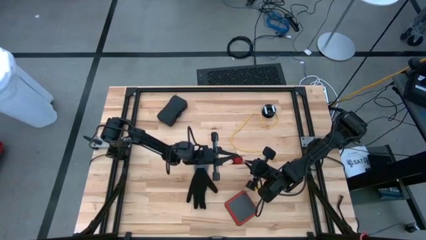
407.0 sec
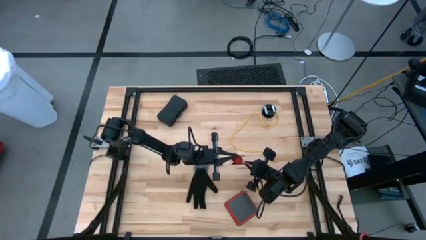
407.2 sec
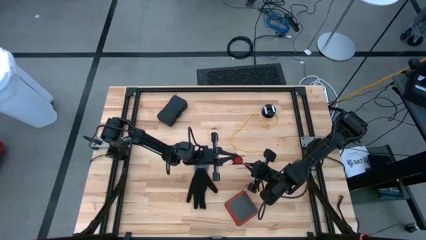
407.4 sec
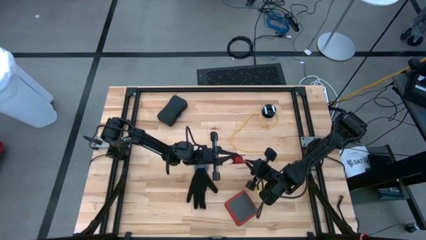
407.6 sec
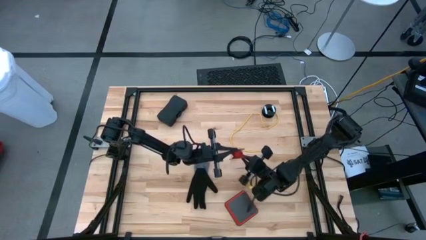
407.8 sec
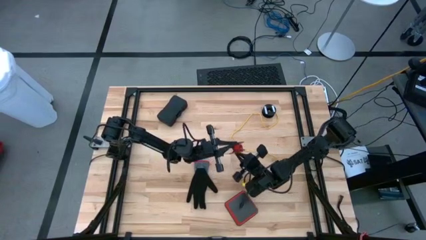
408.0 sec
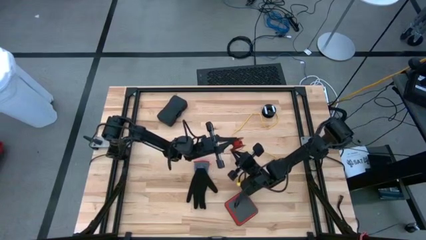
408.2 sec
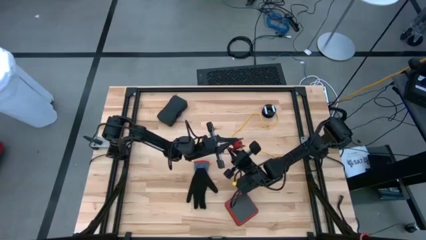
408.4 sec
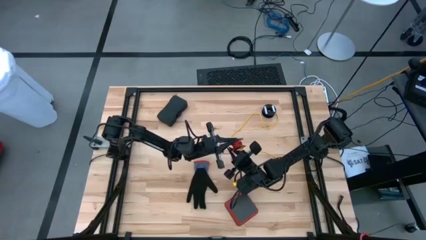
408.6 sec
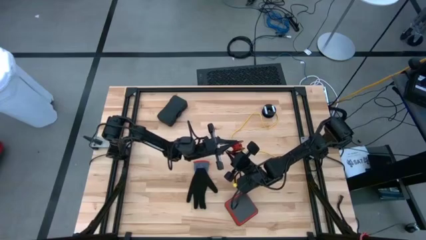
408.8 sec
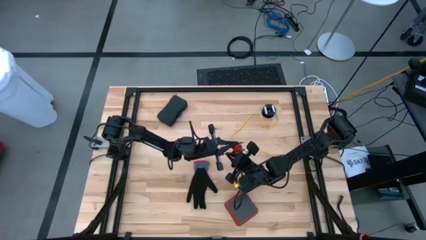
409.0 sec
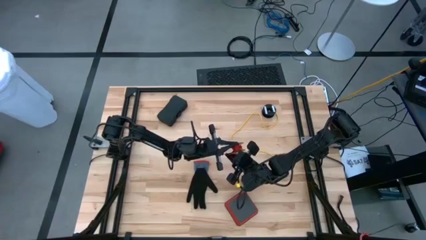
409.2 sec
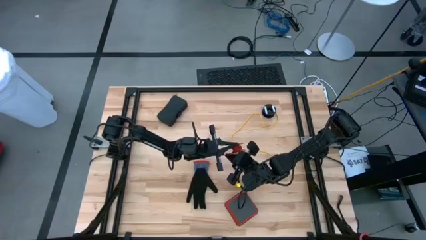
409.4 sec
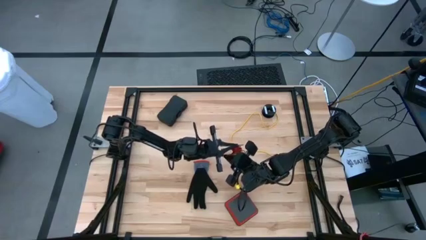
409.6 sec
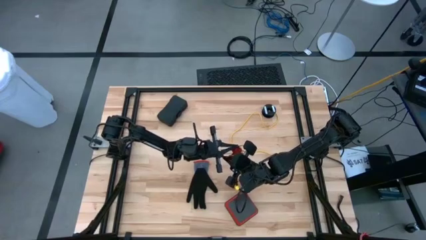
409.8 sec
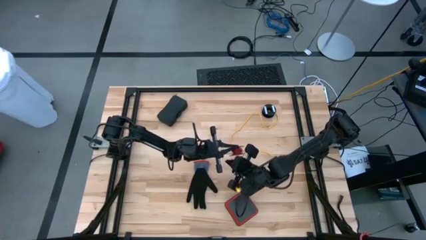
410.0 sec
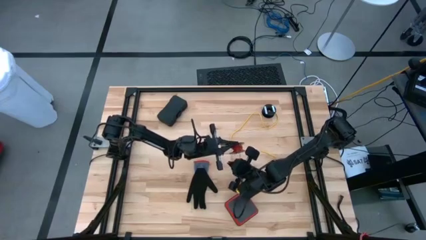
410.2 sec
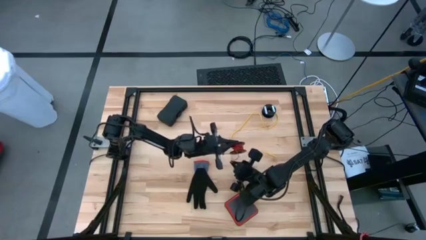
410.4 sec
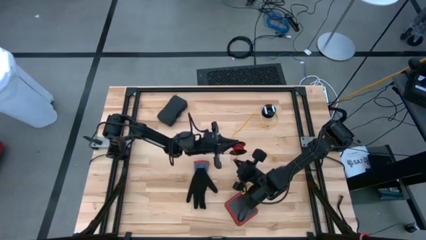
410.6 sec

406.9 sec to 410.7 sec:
Task: Coil cords
Coil the red wire onto the black spool

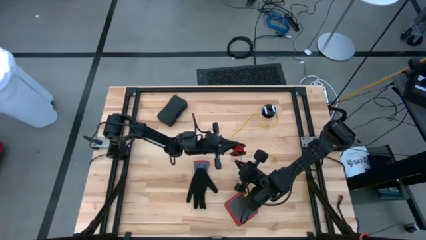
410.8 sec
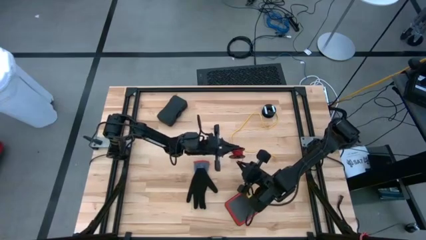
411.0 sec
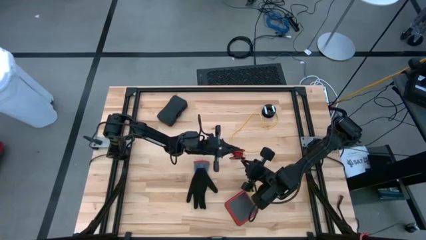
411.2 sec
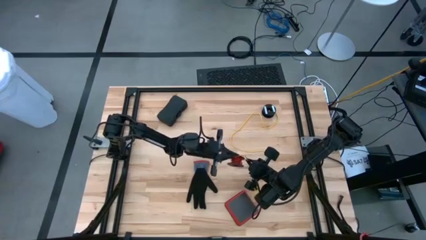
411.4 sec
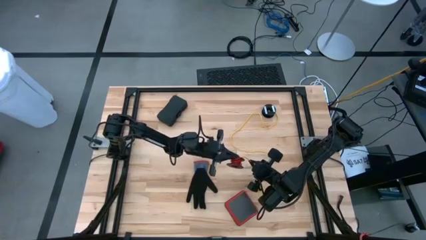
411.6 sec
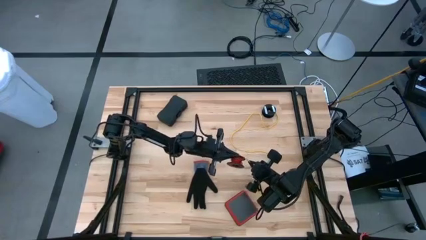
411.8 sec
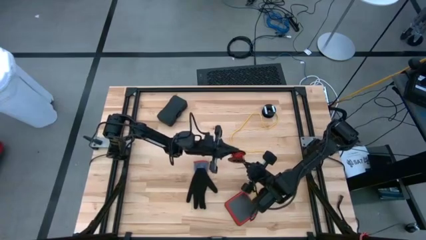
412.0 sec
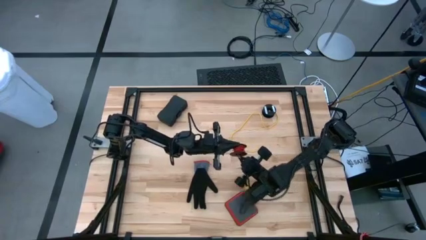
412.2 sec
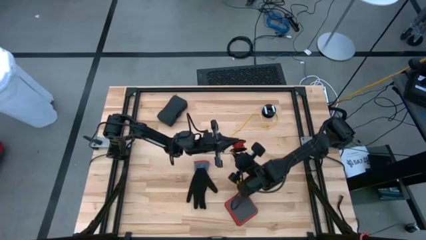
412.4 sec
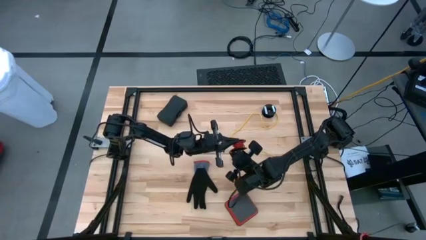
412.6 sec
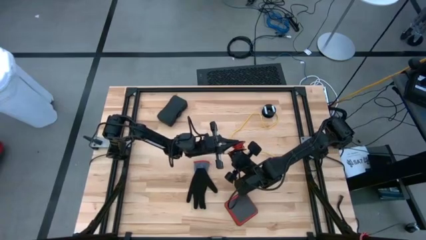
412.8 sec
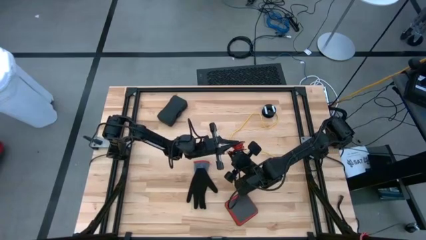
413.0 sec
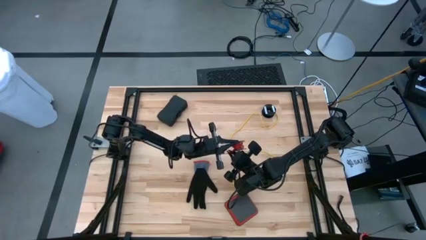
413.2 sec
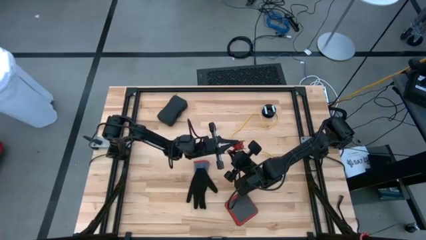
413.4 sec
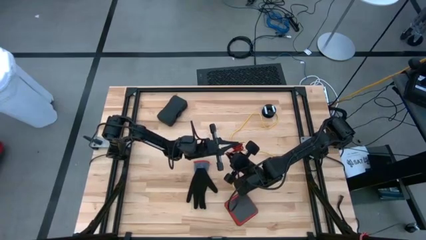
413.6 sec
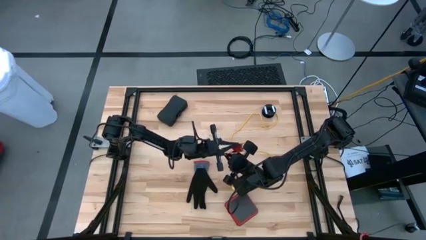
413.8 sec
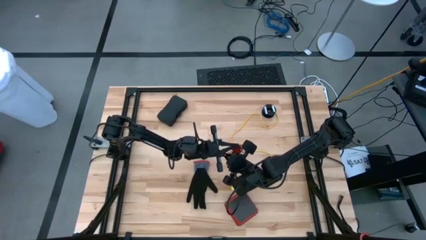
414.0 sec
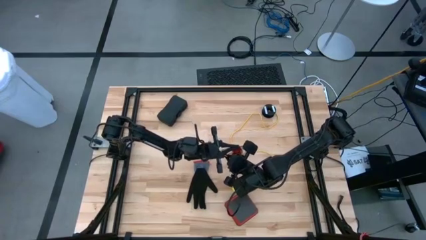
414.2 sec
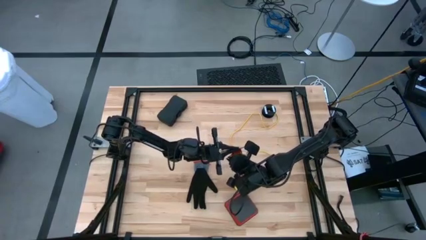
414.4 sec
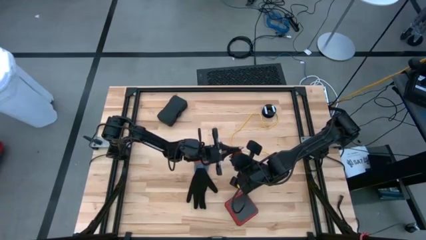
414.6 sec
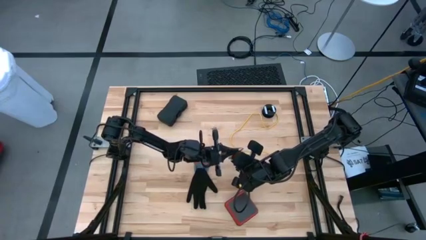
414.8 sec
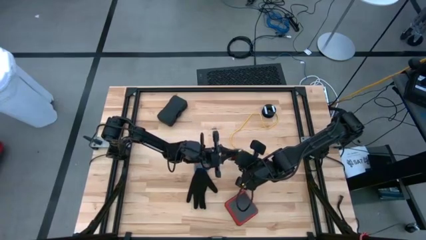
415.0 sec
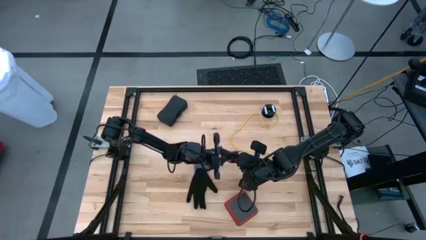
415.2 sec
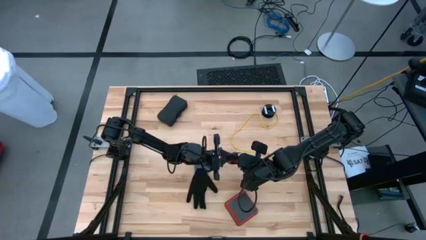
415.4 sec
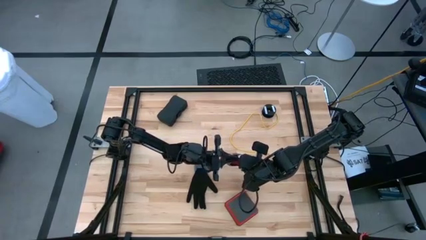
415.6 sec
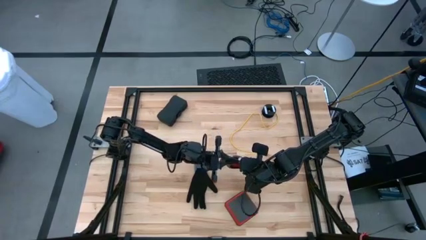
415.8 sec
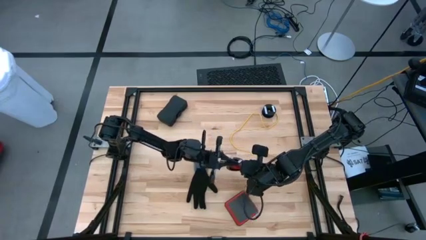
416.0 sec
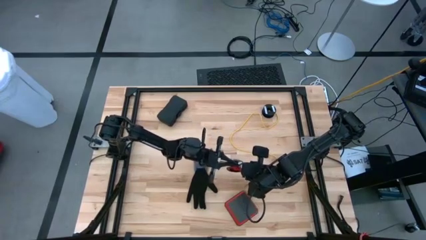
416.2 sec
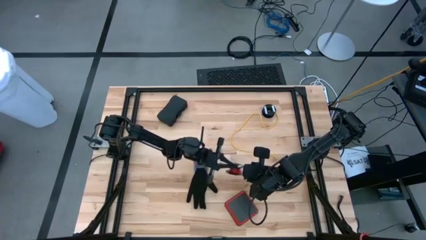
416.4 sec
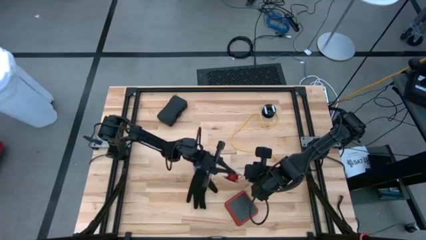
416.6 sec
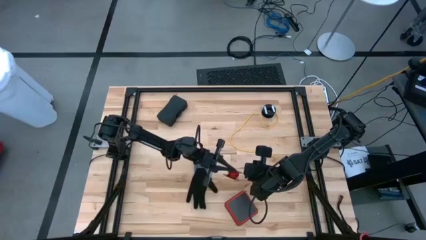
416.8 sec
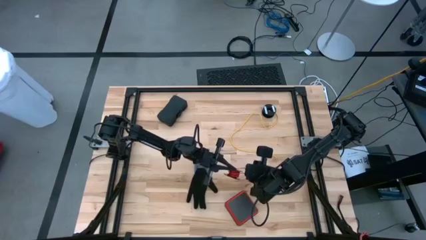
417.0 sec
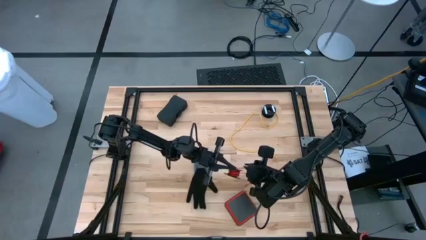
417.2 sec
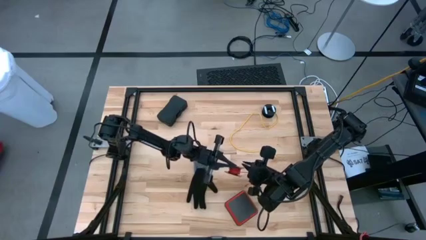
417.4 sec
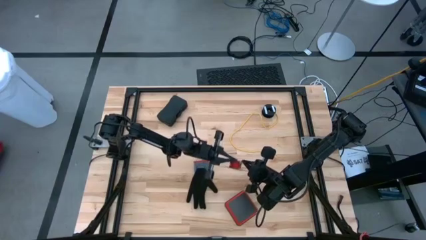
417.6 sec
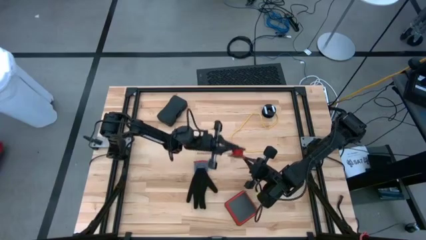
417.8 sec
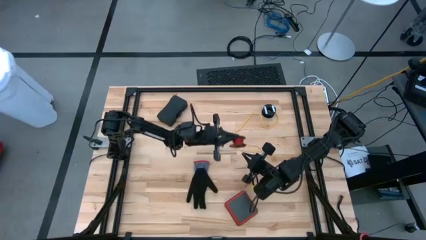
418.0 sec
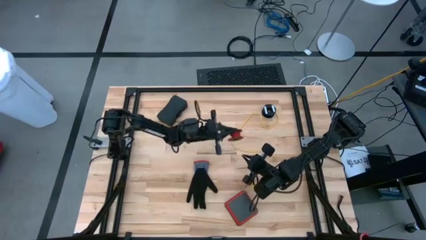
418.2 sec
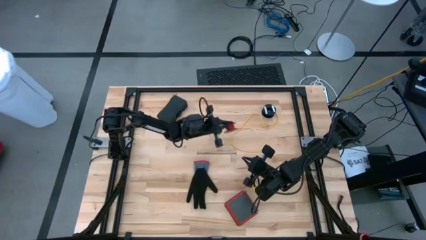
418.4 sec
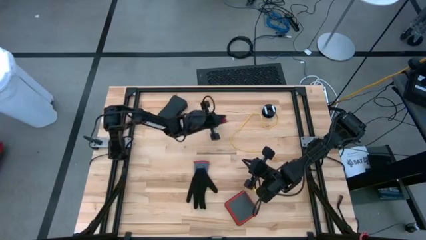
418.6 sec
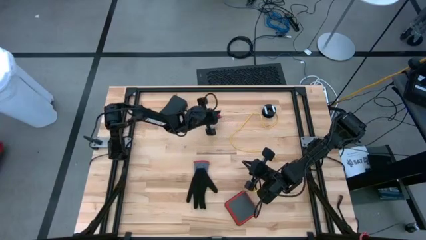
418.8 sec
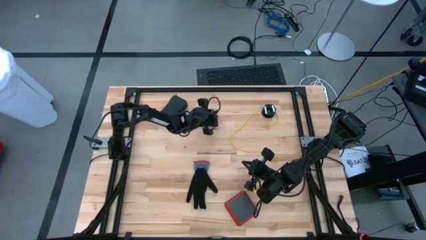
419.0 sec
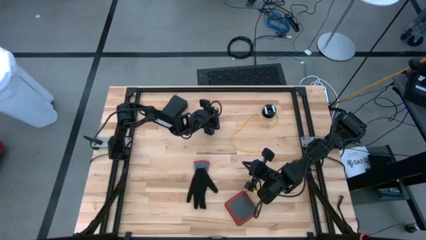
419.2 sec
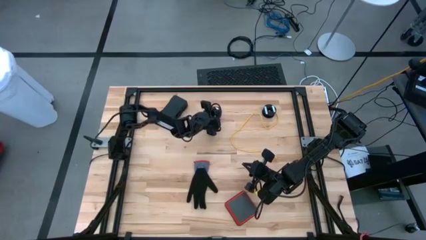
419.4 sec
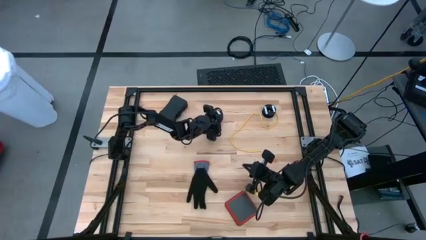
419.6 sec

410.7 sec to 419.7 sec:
Coil the red wire onto the black spool
